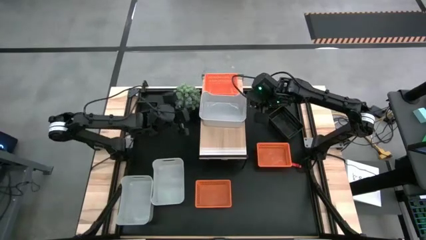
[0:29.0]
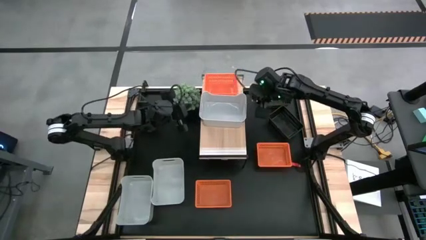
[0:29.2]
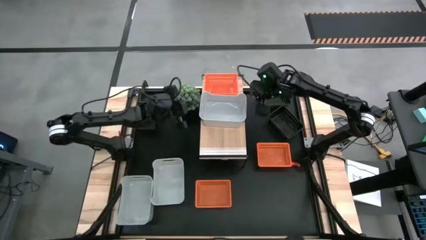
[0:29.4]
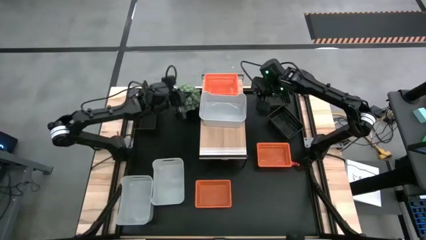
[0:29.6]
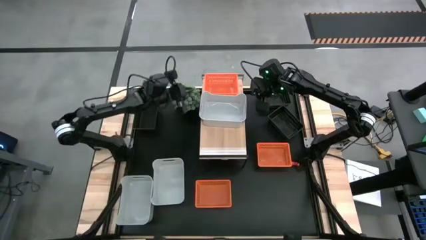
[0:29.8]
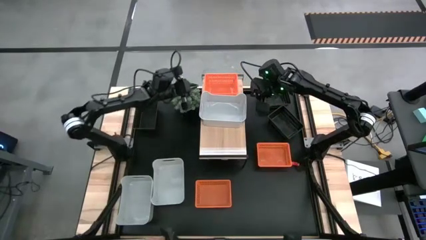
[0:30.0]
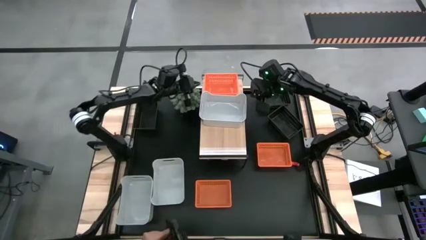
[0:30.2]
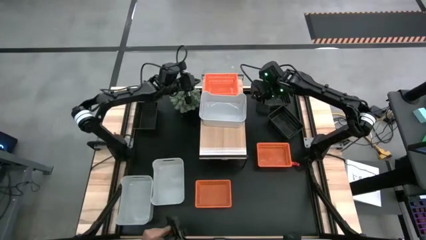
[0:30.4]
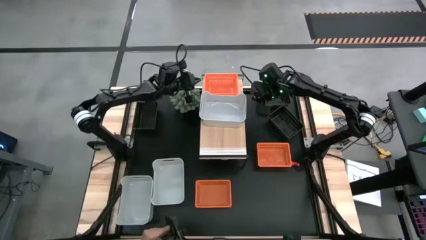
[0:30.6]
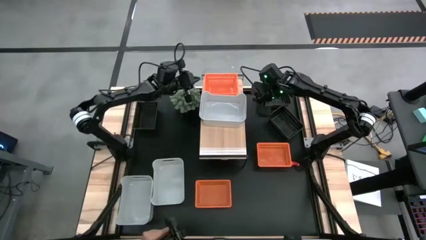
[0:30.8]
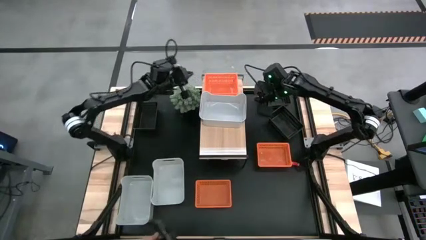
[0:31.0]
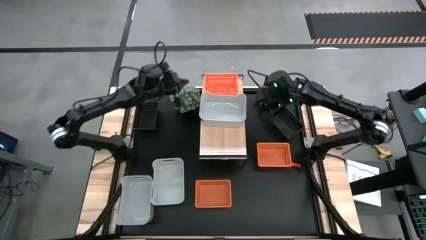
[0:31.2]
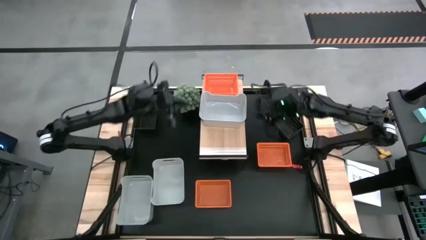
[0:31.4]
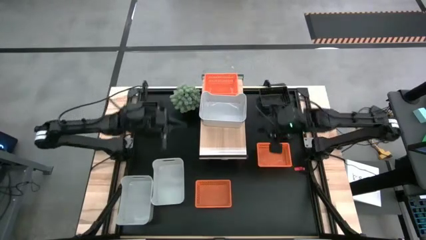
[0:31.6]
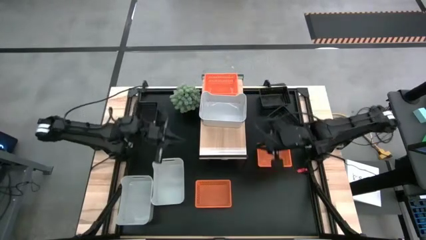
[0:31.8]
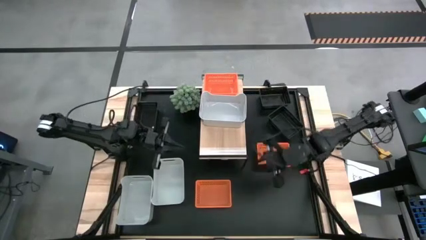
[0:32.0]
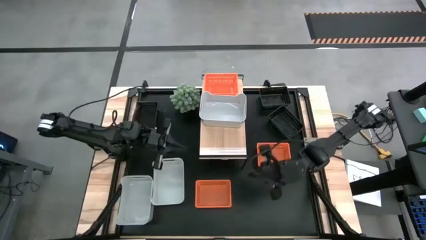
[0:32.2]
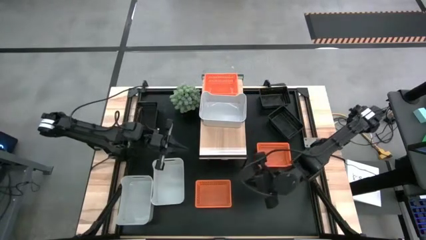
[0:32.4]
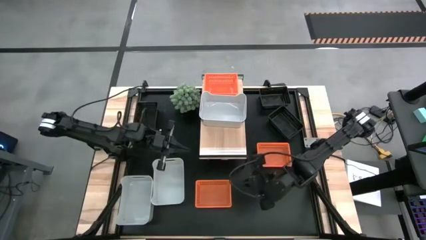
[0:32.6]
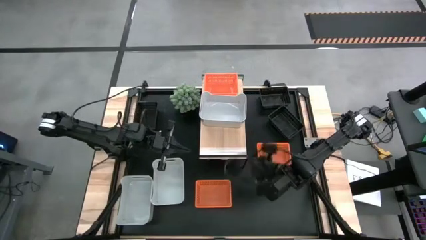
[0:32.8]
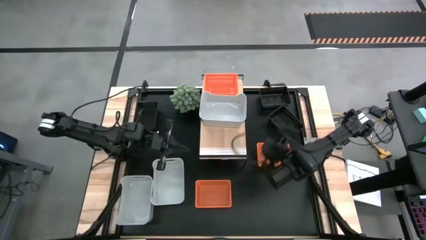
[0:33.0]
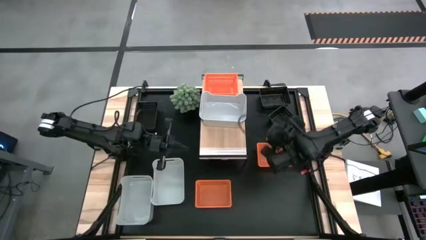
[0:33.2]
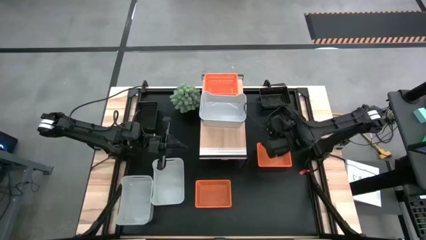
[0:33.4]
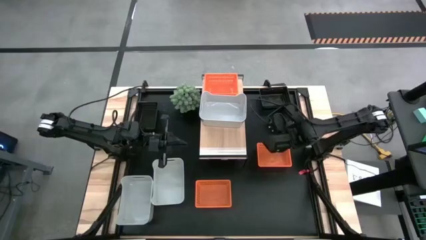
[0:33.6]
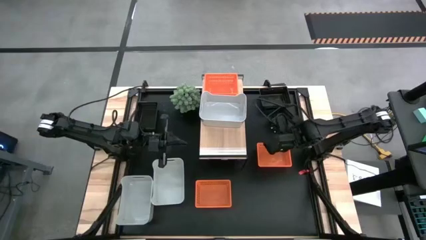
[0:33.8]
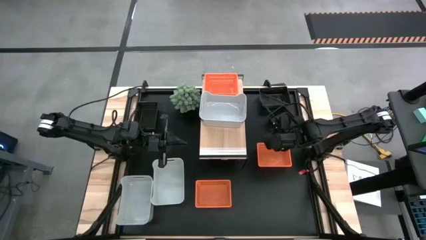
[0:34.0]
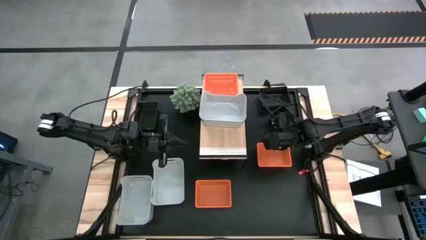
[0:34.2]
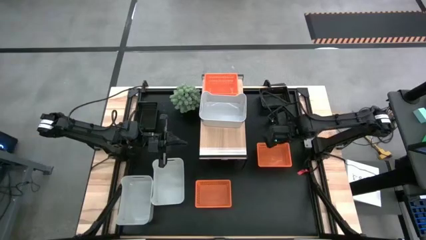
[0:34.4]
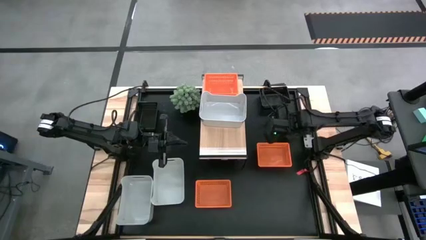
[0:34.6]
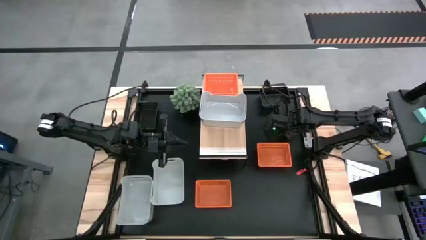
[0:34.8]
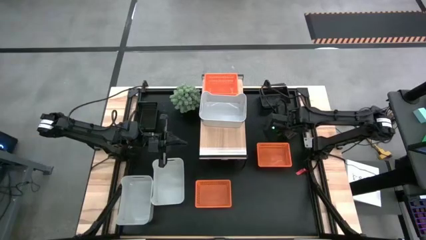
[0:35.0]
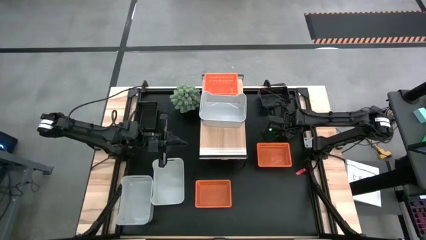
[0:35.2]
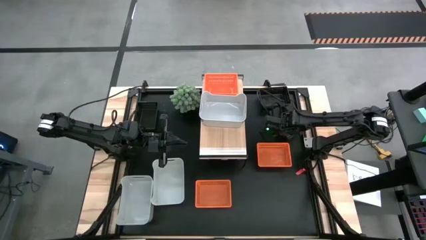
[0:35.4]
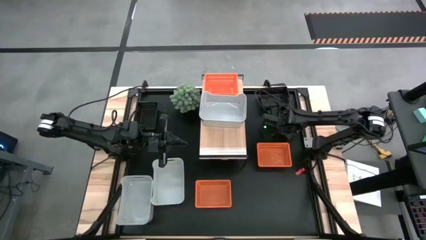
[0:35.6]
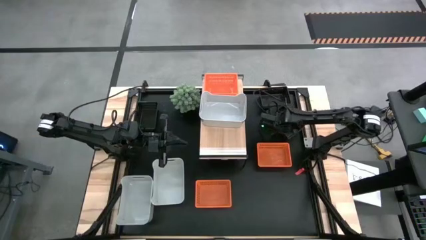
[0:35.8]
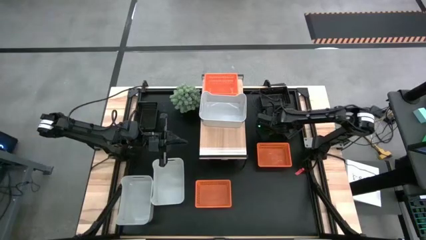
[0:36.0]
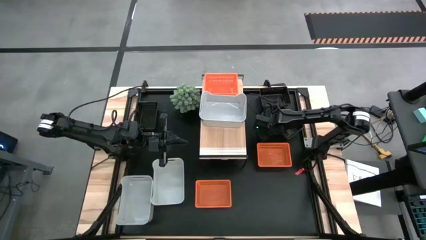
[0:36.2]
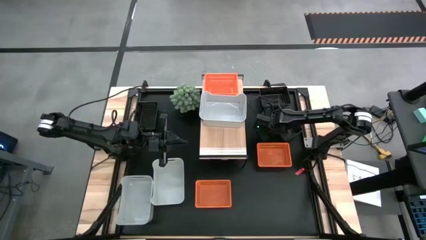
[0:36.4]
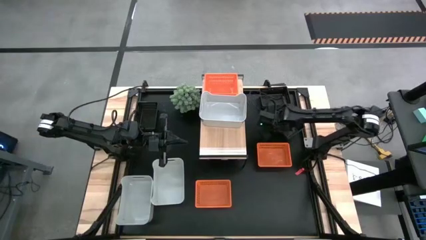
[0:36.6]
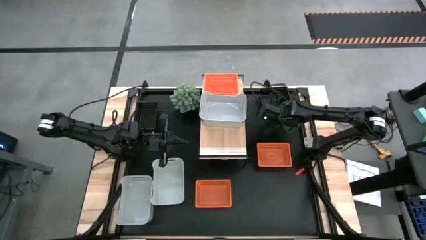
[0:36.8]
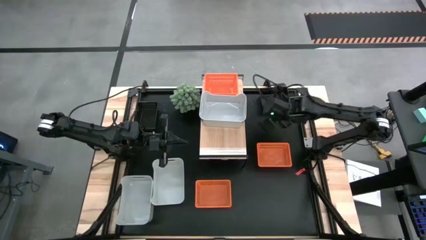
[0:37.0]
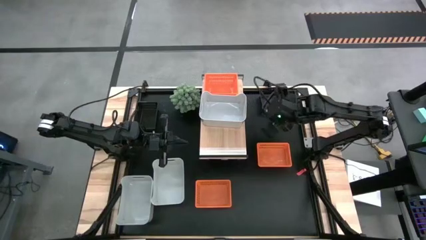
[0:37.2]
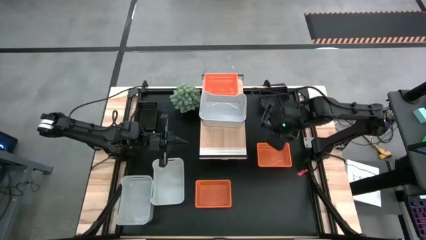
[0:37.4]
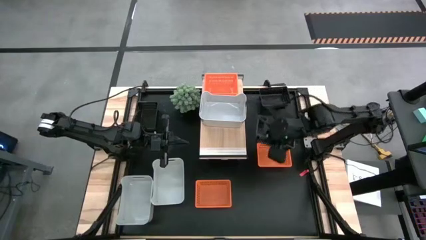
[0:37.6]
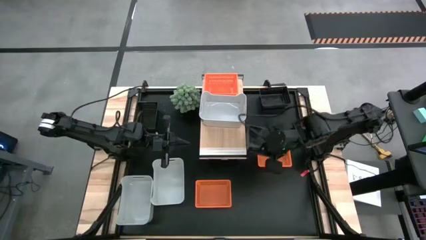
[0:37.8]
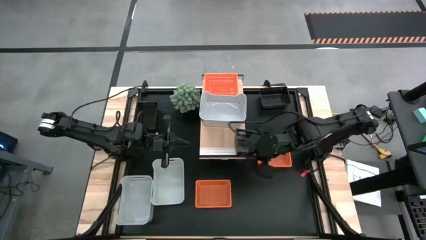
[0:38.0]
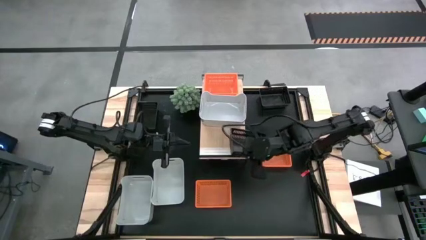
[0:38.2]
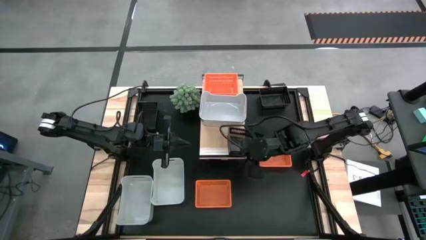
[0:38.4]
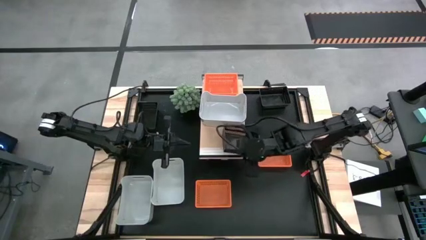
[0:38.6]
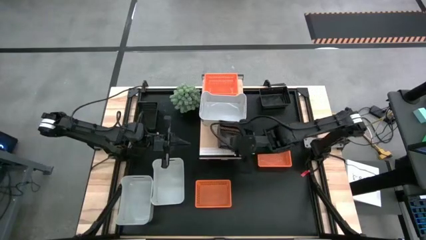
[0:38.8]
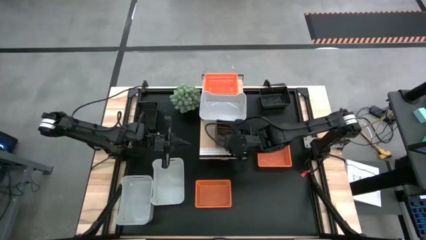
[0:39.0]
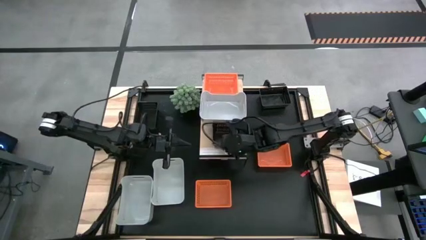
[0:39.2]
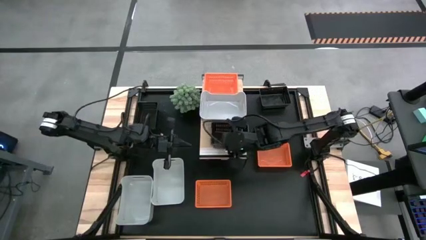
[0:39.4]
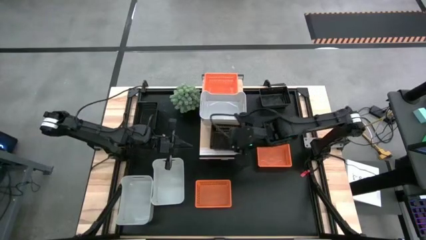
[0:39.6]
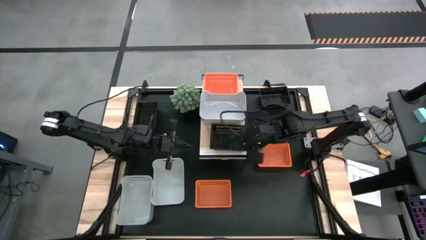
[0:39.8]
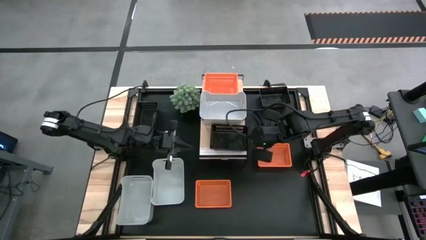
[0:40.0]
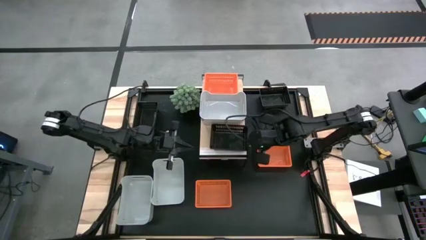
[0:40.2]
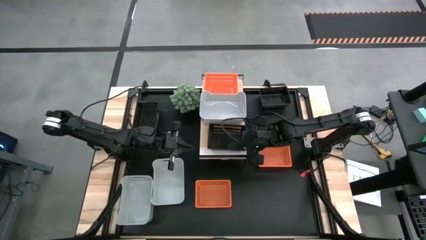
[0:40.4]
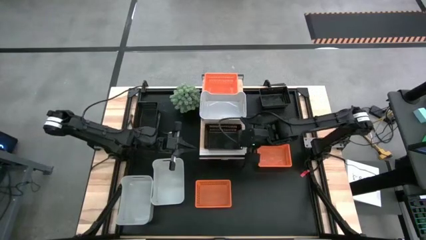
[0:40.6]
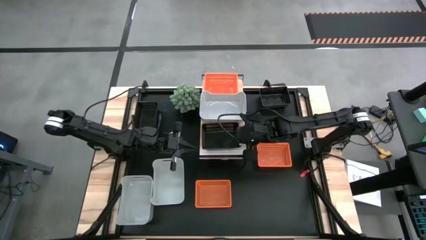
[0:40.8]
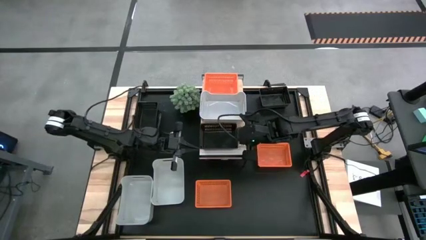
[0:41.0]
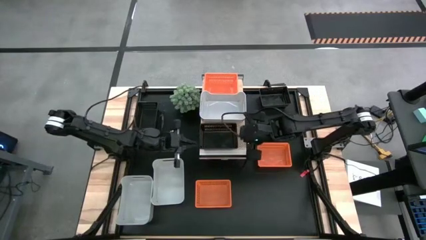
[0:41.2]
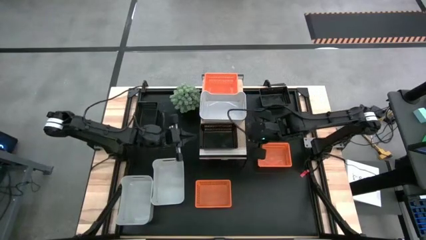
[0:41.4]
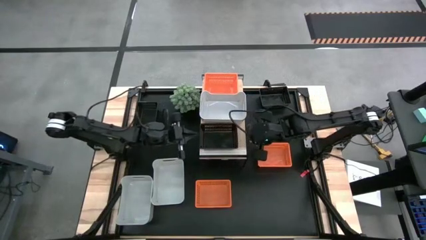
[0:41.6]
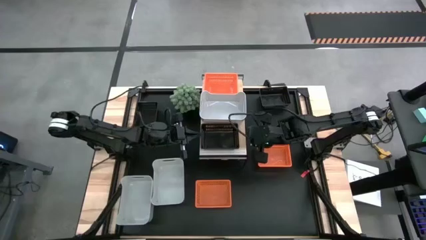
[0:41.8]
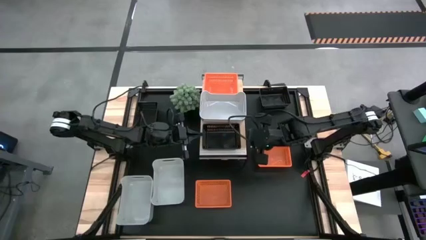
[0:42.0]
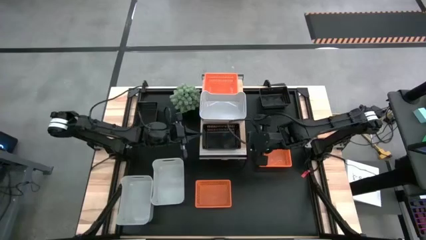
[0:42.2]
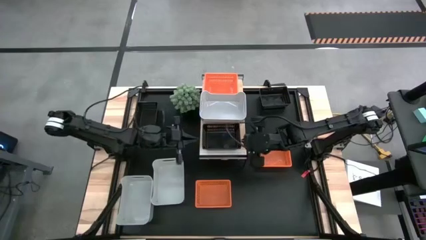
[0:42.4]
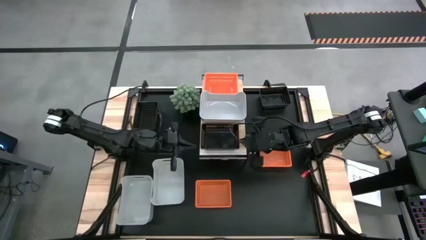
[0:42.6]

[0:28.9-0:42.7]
Task: Stack baskets on shelf by color
Put the bottom right black bin on the shelf

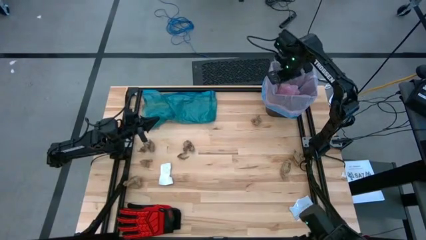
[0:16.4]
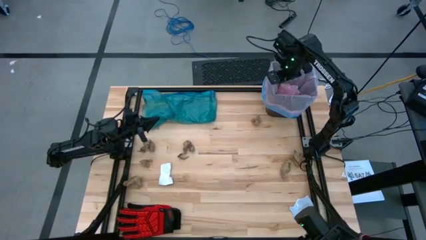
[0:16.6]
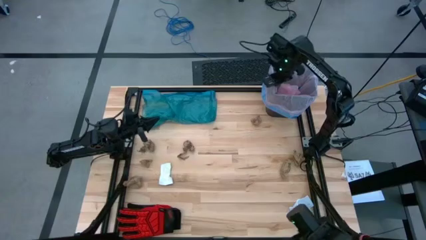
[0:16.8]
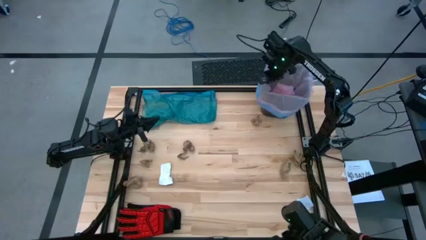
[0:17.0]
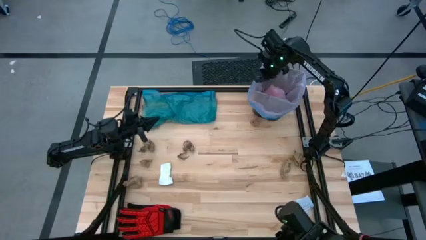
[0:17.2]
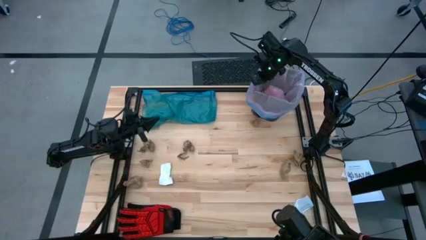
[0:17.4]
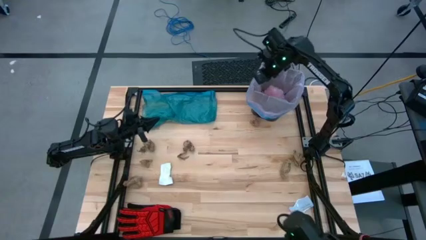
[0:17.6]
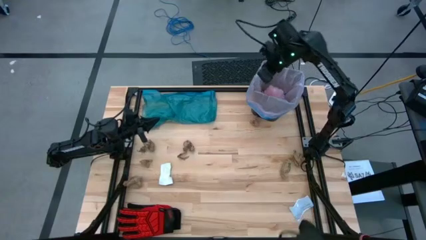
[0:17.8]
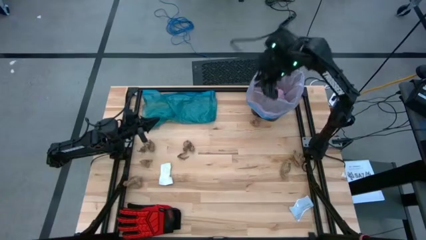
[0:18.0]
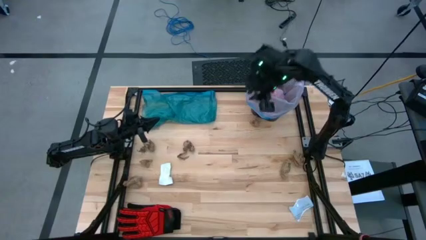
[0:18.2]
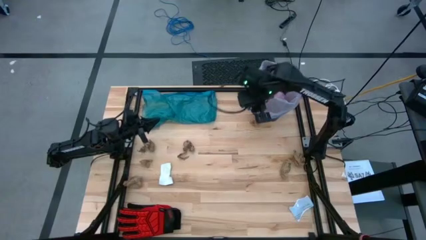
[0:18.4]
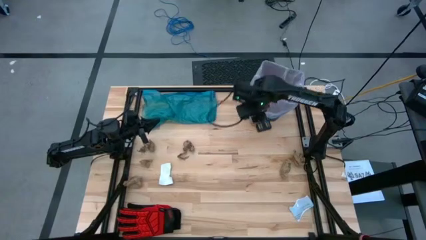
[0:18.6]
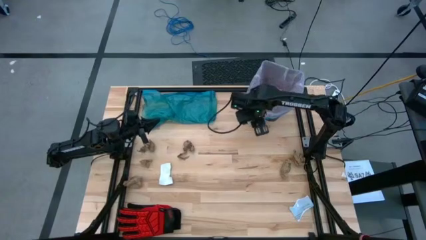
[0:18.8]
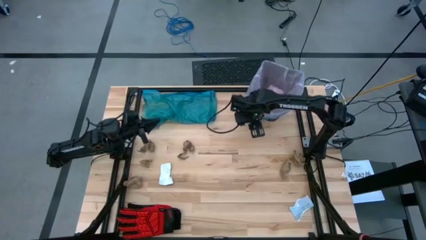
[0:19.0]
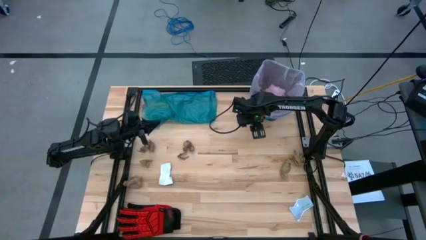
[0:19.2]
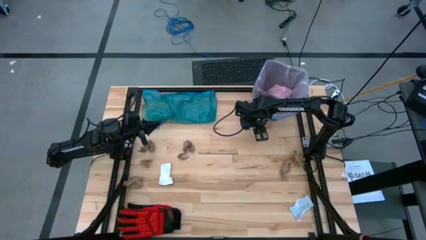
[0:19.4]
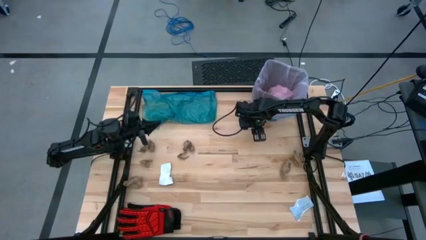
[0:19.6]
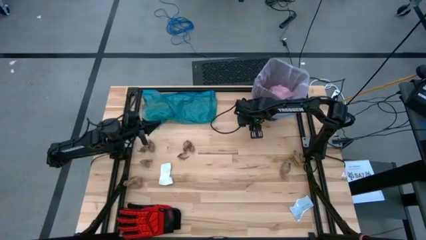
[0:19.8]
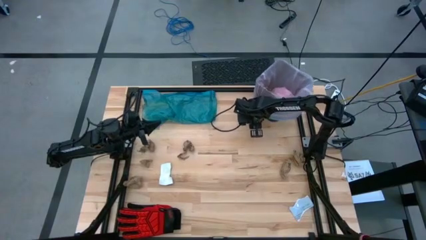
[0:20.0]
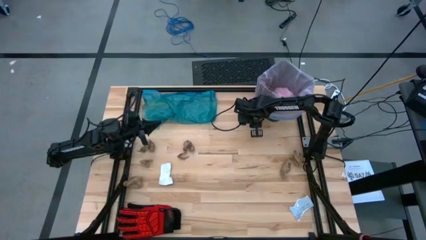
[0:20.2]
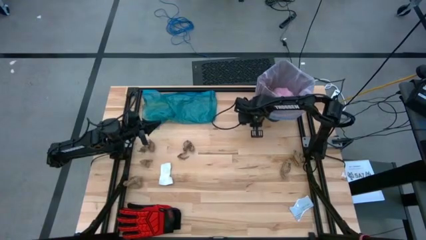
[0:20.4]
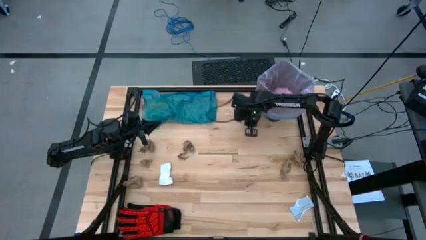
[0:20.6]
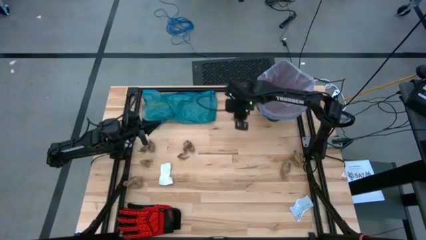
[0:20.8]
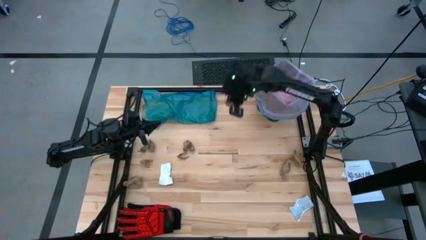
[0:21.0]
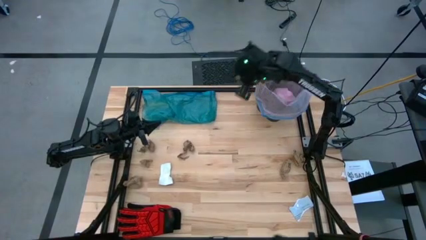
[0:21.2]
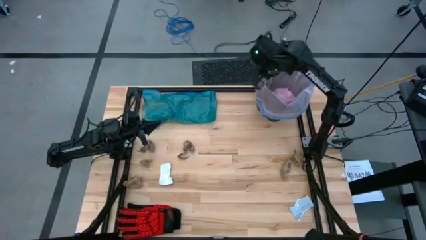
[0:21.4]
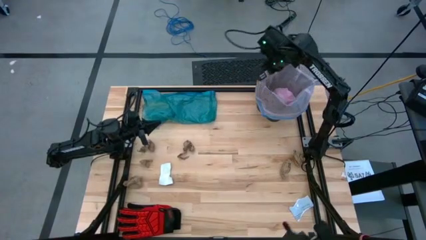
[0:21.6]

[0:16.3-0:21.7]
Task: place trash/remove bag and relplace
Put the brown paper into the black trash bin
